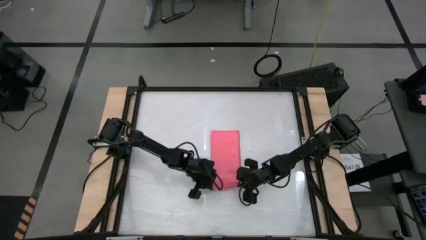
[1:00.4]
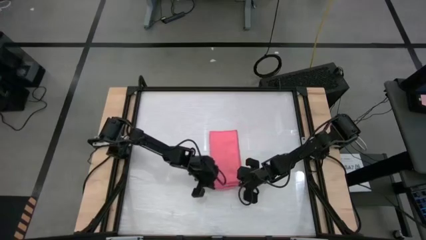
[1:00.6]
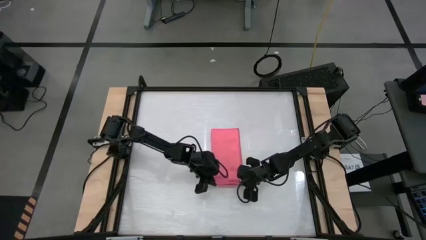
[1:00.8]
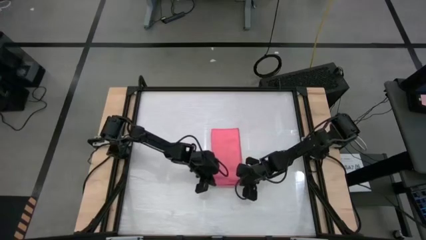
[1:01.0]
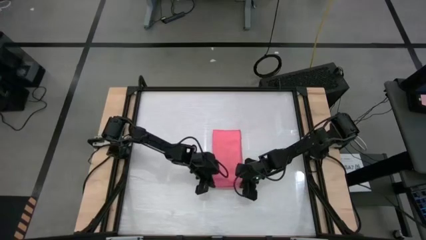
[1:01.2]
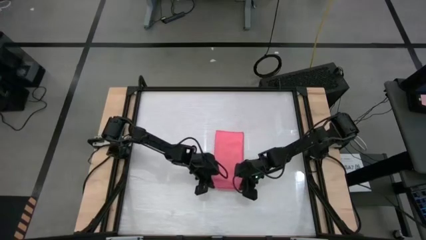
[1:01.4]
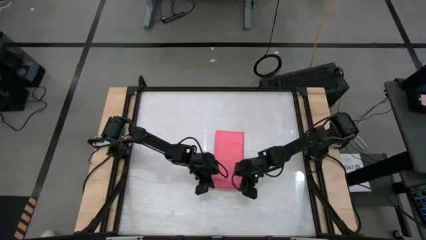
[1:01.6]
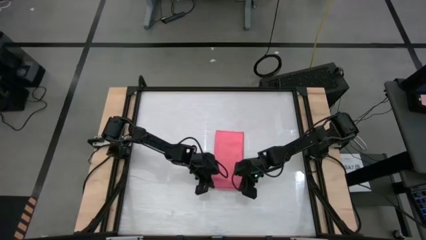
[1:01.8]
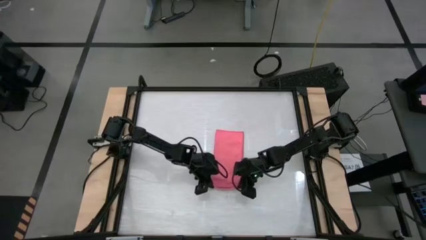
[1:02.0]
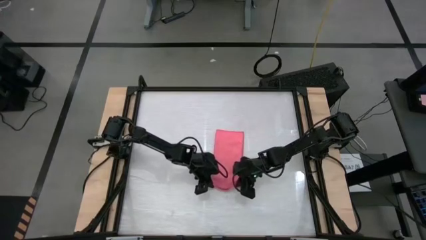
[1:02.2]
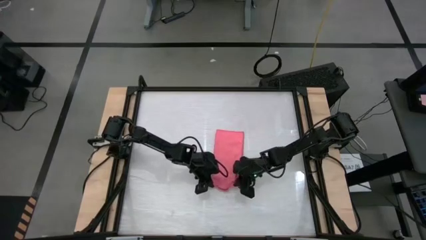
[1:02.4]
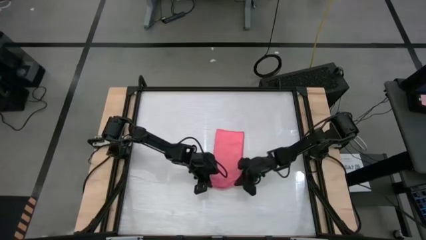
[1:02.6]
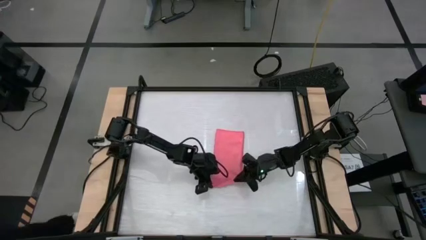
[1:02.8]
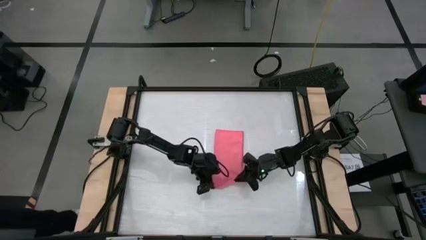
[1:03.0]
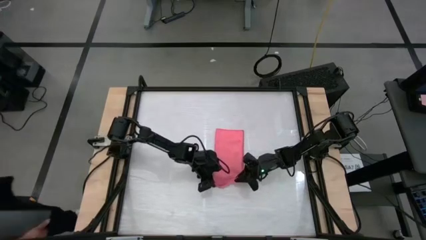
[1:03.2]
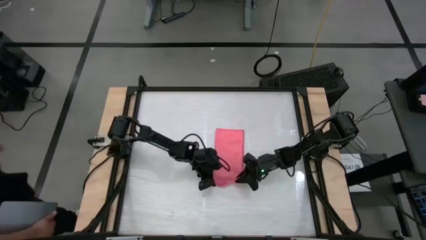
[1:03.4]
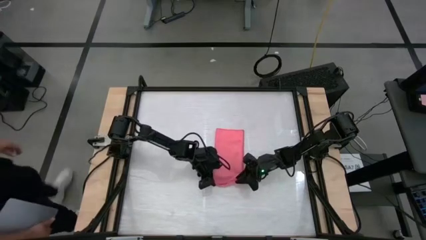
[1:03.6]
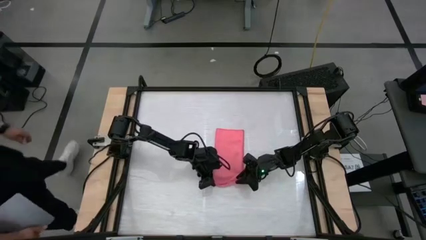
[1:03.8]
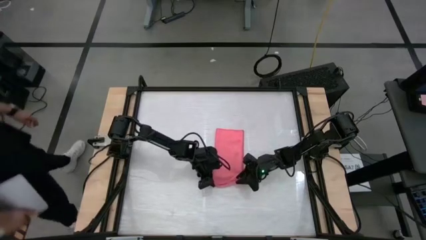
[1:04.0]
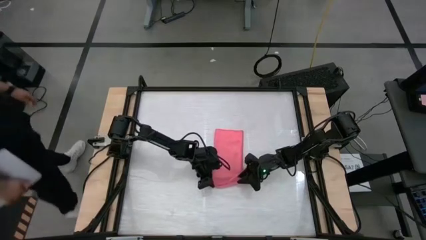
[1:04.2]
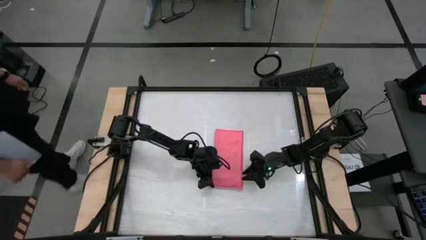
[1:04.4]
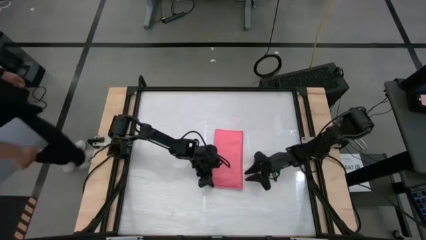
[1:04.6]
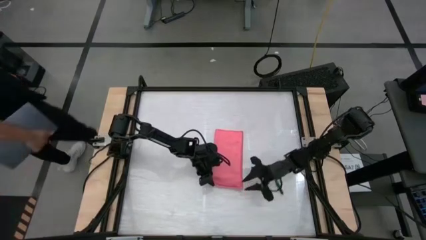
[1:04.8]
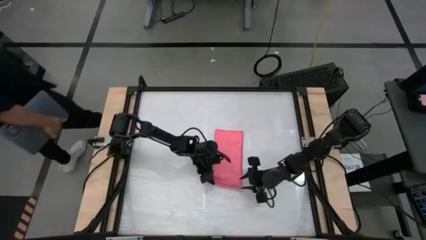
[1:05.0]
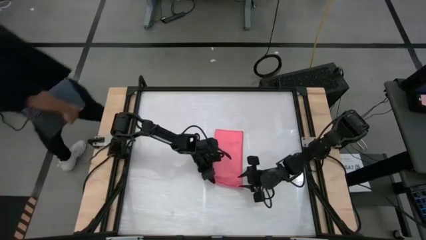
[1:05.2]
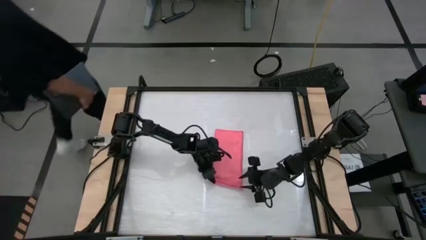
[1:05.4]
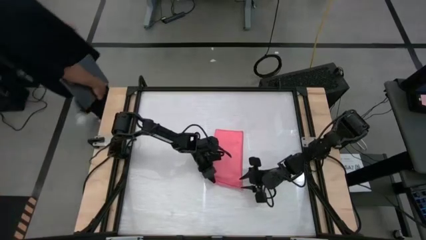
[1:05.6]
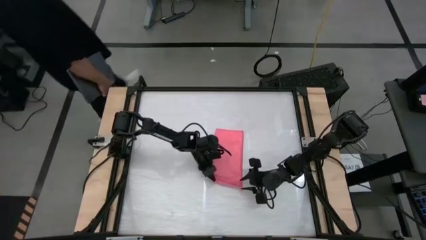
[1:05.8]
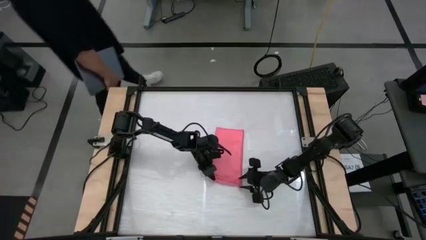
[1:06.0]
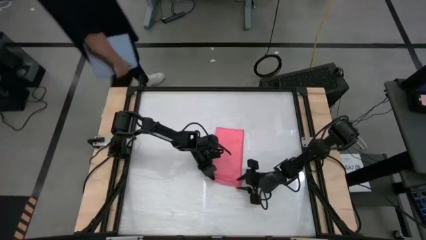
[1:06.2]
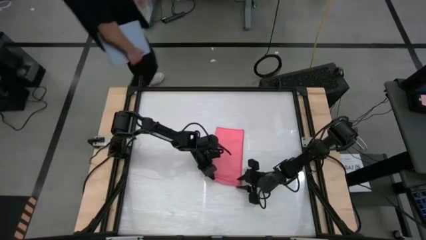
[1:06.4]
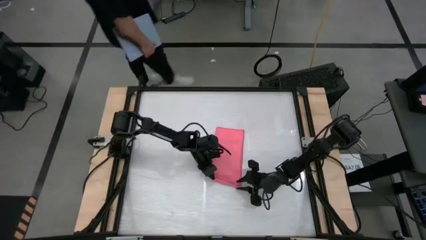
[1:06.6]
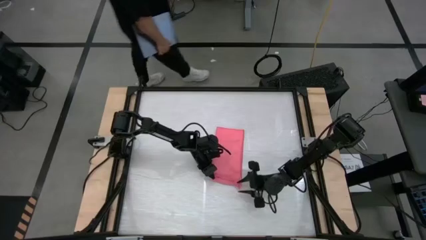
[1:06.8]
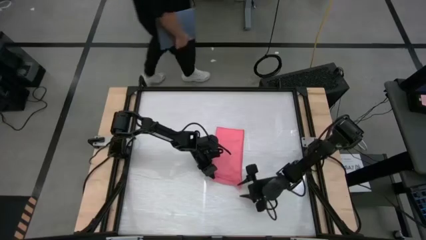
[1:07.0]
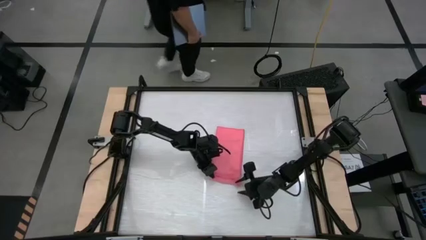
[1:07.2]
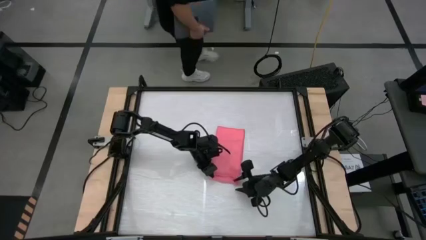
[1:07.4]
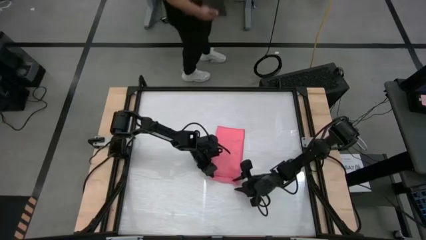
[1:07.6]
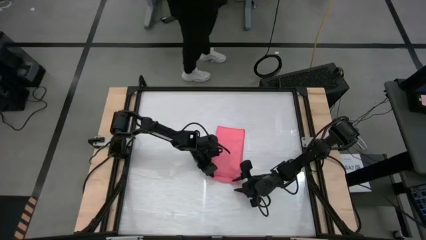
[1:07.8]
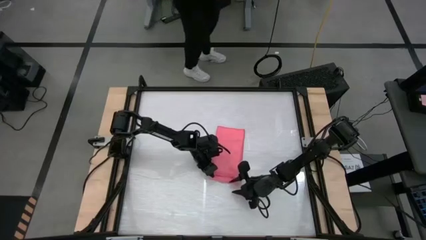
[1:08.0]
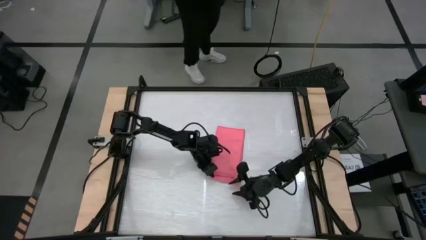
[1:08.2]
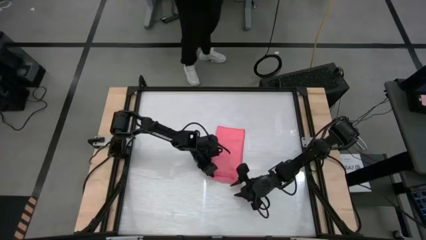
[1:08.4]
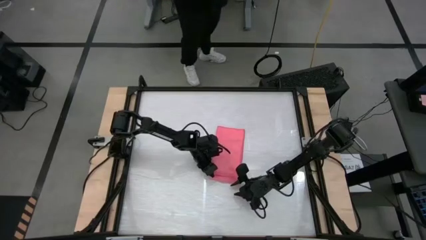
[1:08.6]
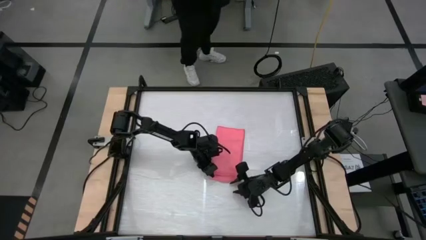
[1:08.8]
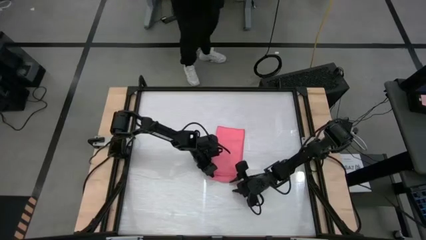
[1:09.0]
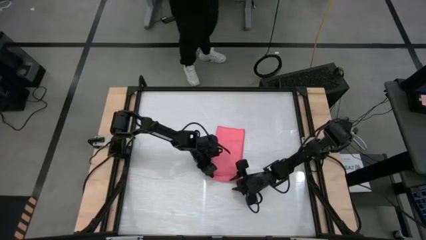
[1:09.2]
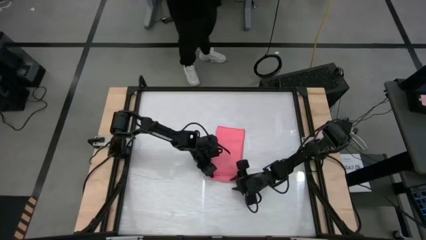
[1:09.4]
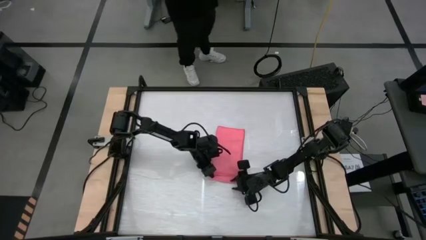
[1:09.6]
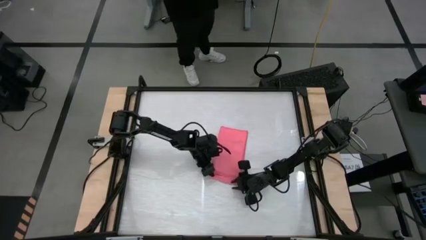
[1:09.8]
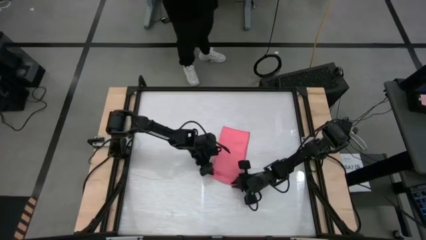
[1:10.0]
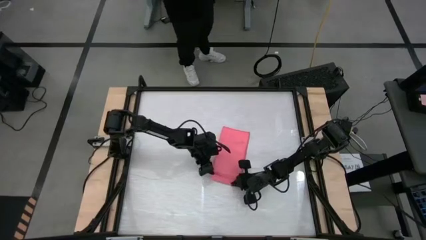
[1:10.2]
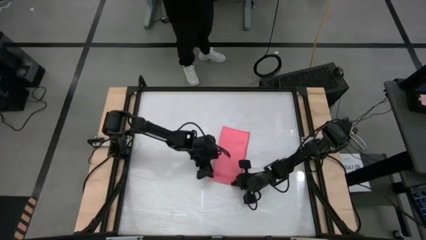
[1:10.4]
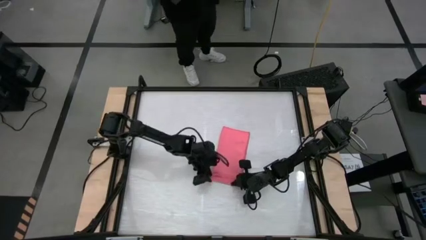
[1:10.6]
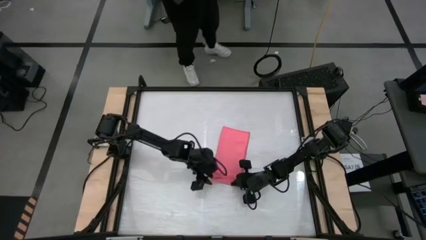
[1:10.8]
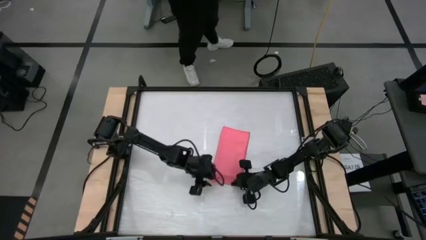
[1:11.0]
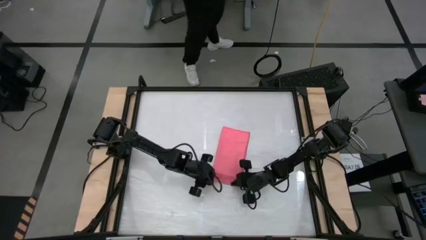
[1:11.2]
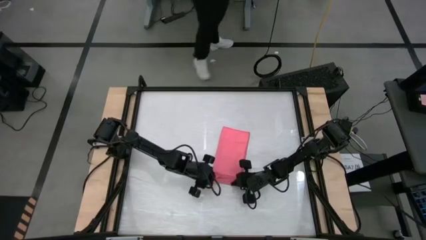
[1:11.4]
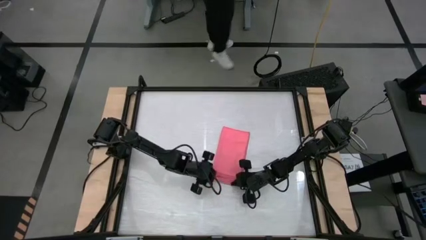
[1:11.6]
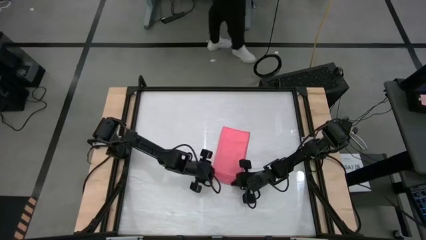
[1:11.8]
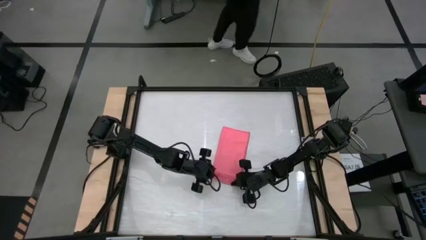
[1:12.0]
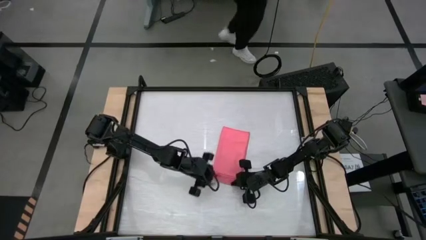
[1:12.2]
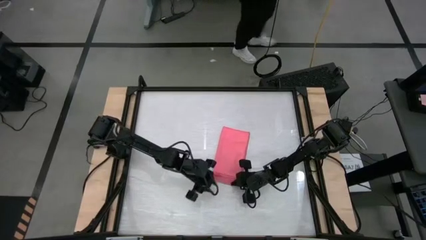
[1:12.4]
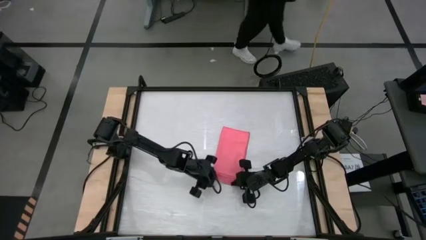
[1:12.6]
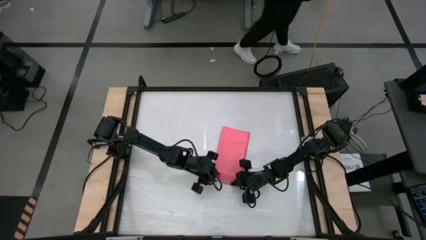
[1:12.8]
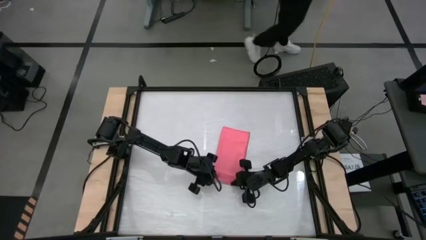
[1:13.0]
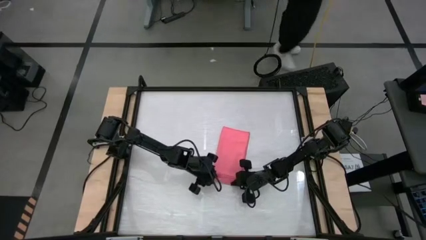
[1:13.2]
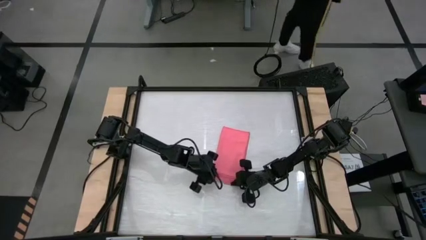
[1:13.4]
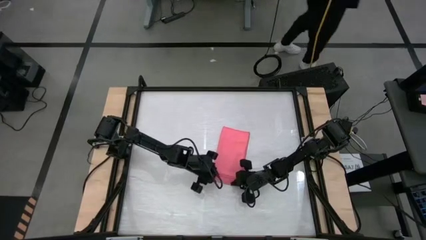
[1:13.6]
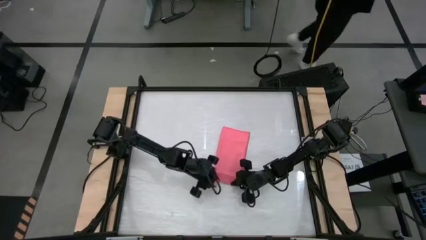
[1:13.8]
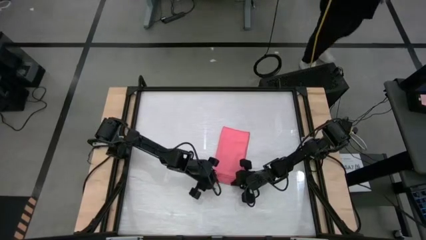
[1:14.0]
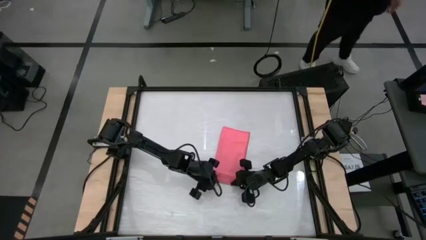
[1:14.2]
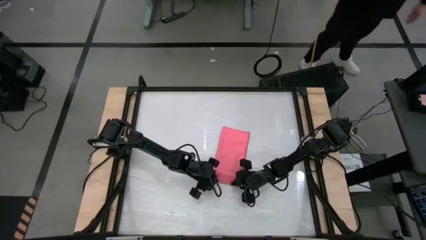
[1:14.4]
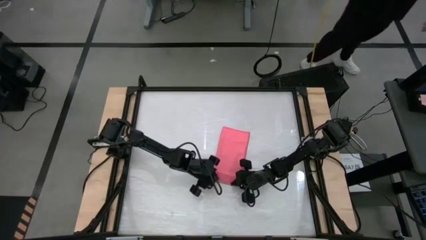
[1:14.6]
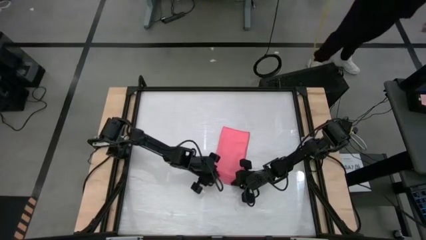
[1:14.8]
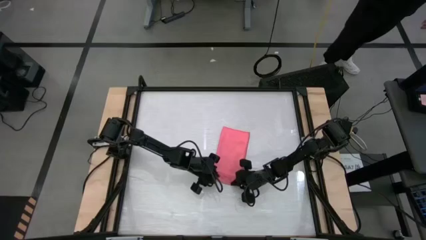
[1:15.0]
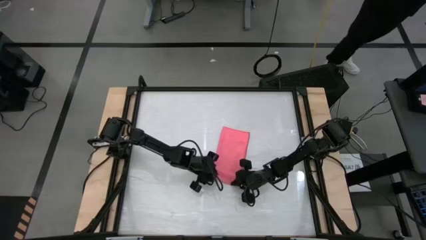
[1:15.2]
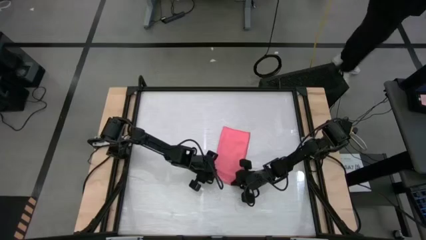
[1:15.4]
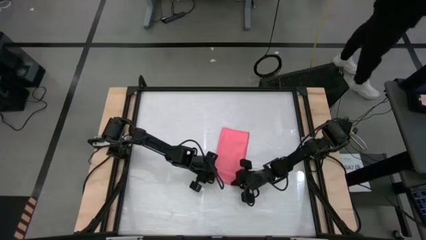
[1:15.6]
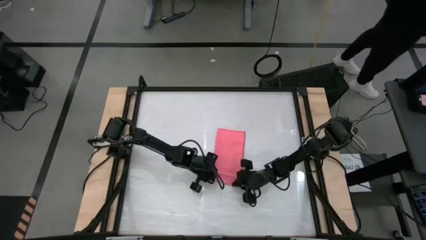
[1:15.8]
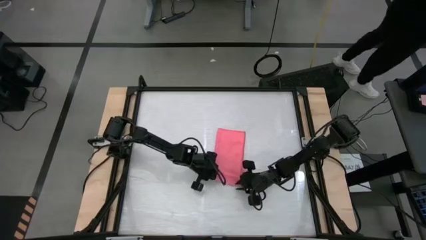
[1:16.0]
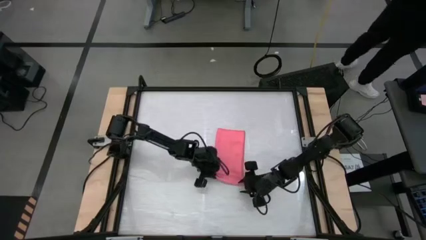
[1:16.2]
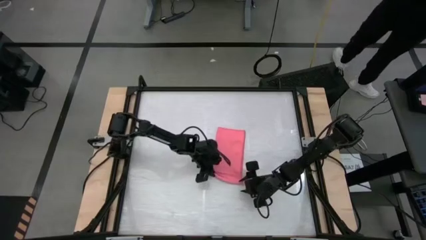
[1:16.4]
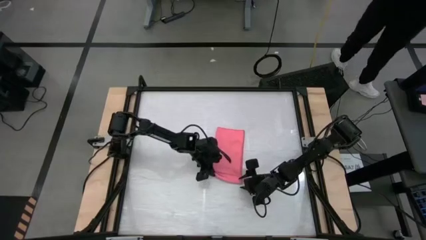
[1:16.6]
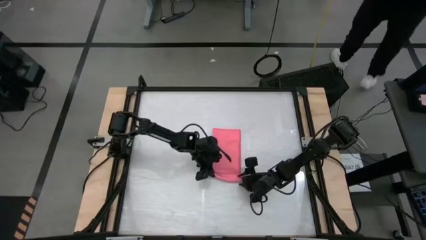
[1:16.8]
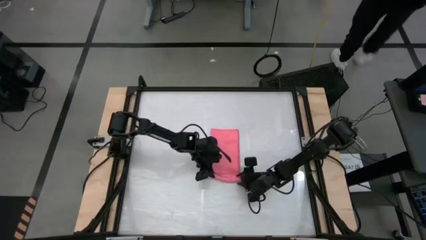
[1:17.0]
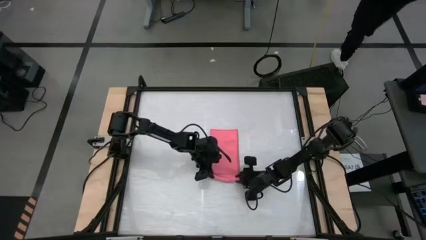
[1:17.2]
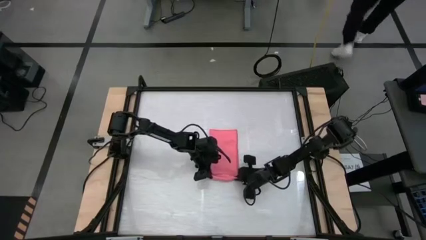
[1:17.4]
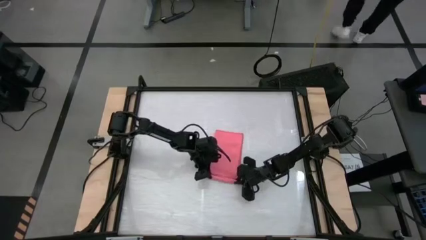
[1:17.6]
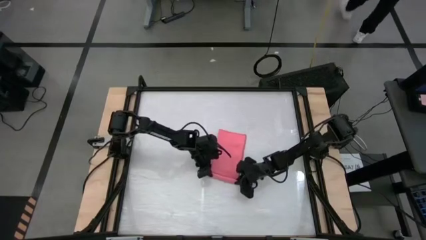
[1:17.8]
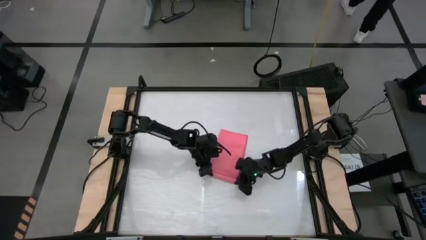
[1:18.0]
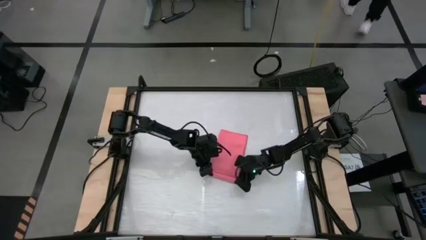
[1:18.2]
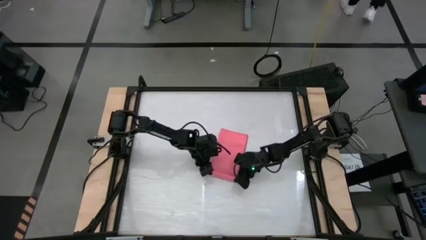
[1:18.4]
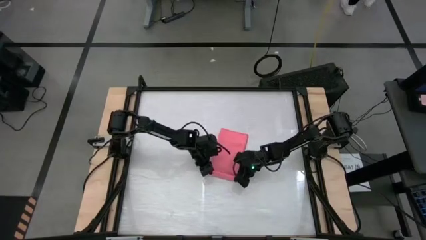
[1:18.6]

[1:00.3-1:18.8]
Task: Roll towel
Fold the pink towel
